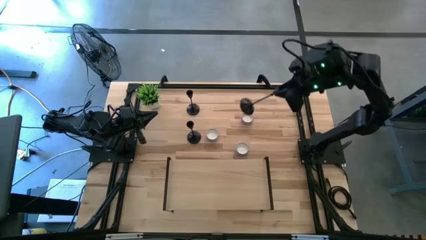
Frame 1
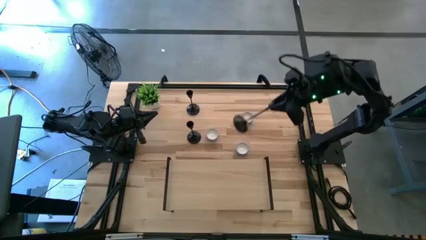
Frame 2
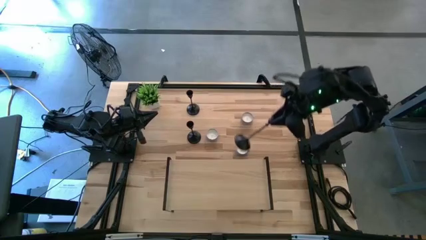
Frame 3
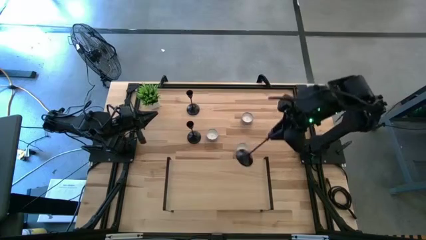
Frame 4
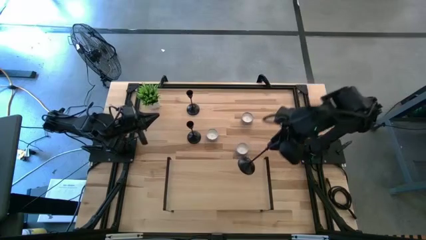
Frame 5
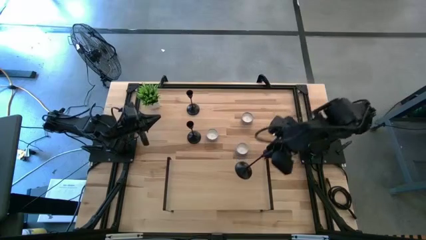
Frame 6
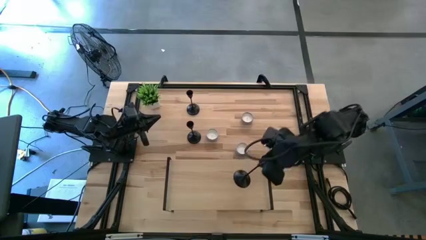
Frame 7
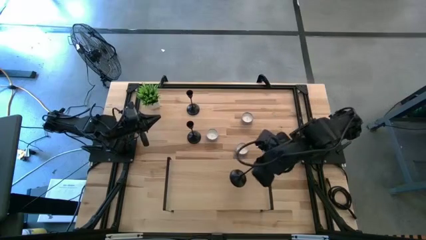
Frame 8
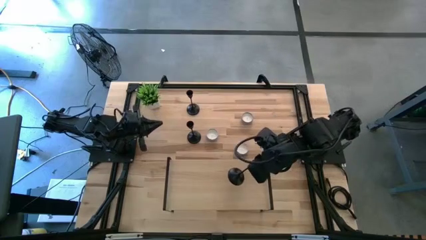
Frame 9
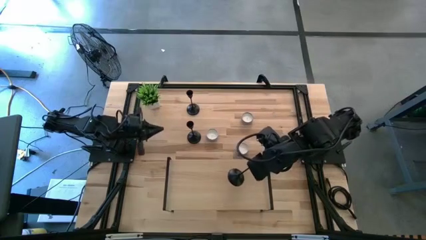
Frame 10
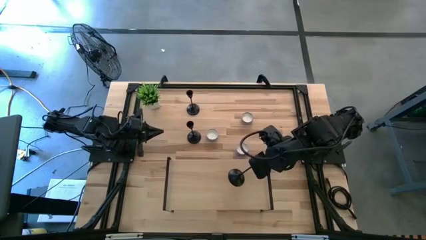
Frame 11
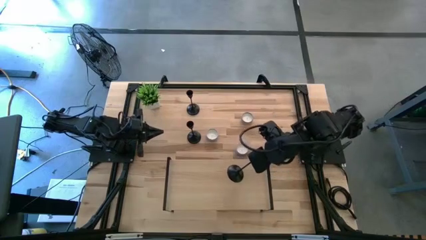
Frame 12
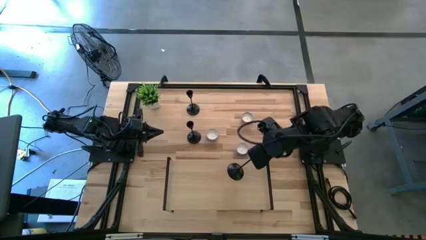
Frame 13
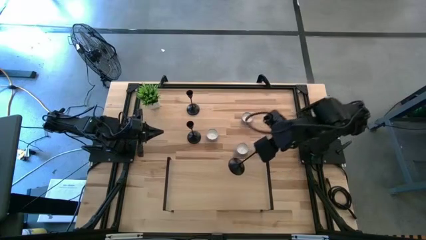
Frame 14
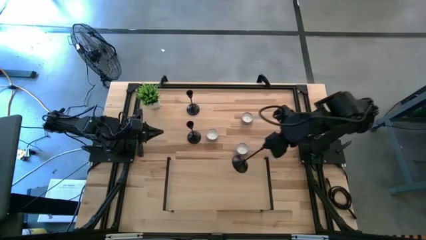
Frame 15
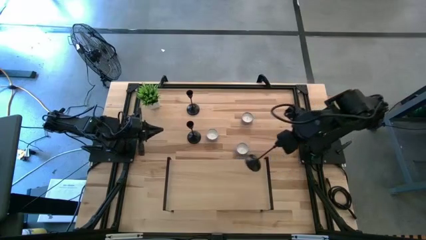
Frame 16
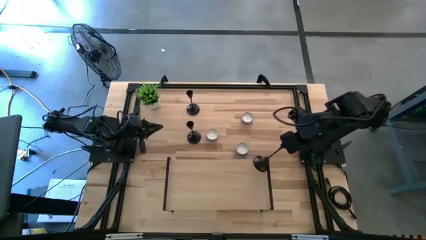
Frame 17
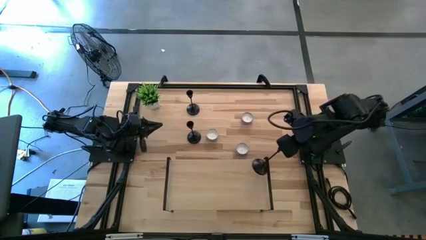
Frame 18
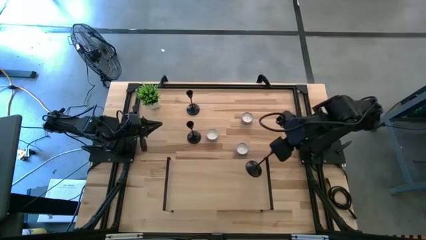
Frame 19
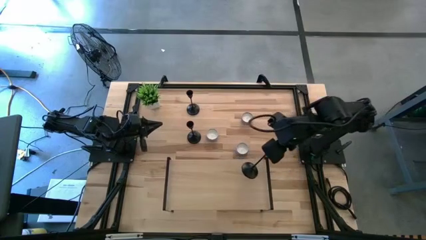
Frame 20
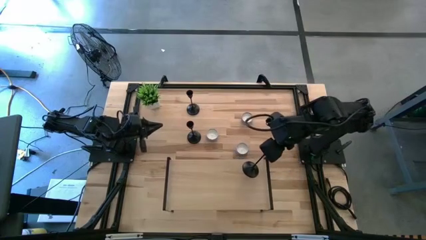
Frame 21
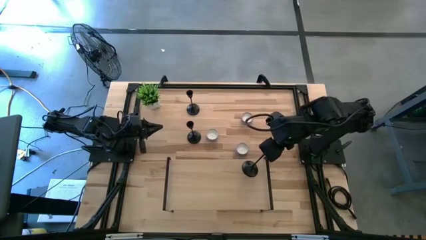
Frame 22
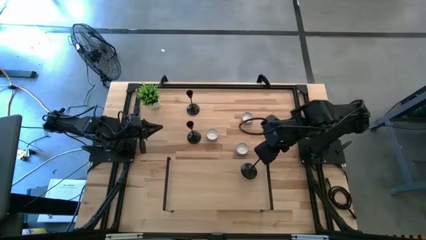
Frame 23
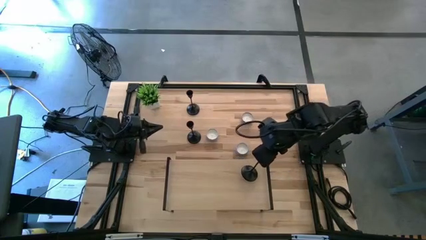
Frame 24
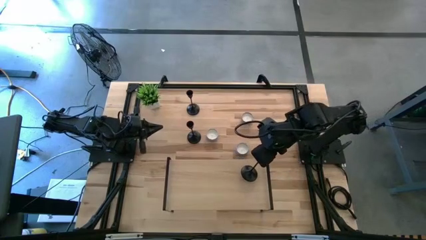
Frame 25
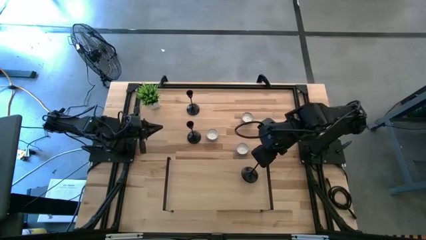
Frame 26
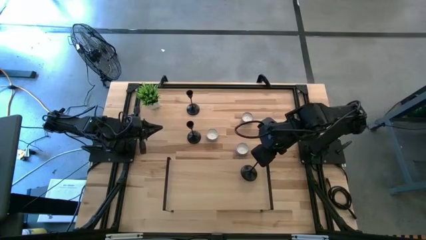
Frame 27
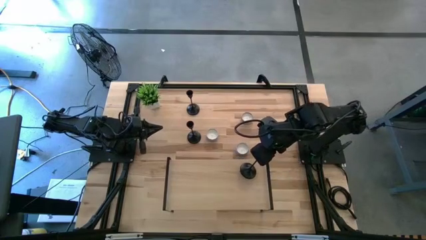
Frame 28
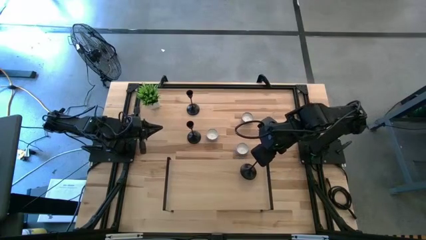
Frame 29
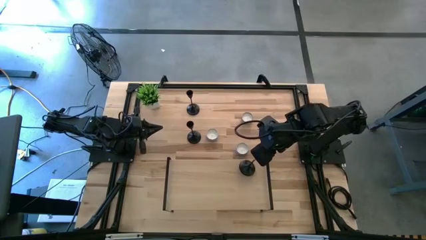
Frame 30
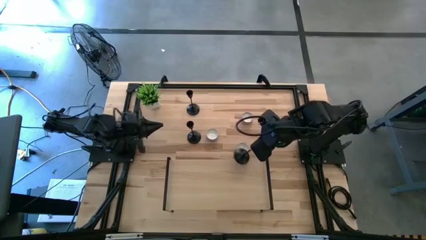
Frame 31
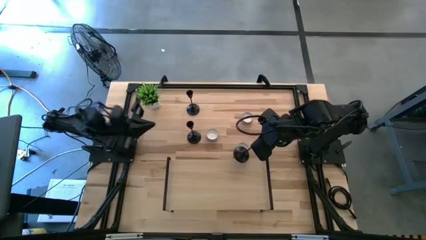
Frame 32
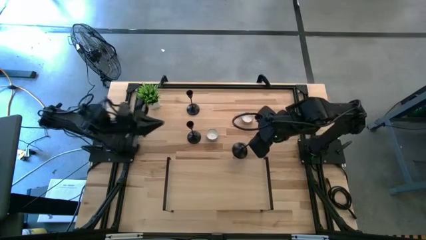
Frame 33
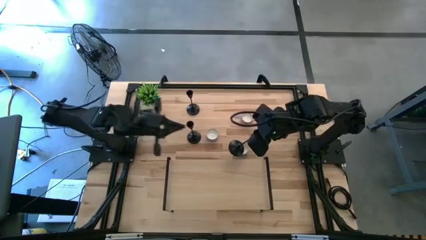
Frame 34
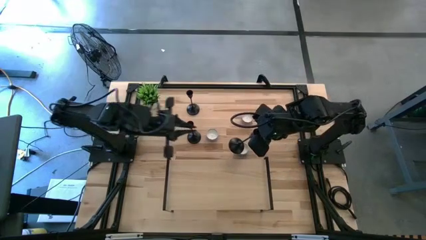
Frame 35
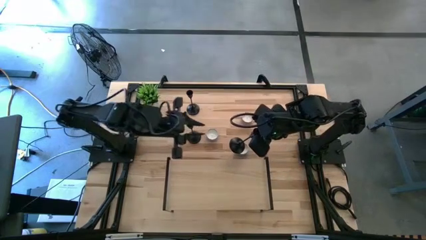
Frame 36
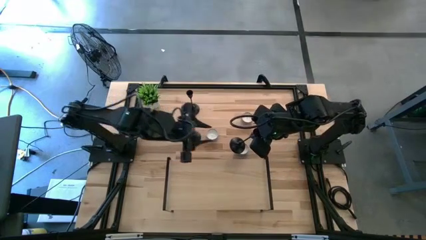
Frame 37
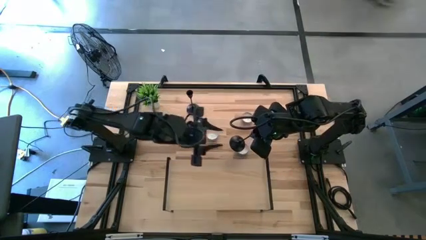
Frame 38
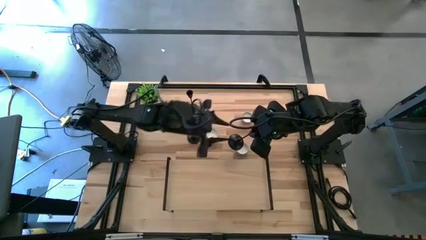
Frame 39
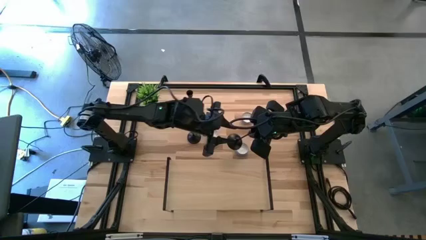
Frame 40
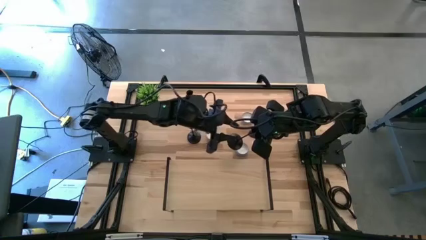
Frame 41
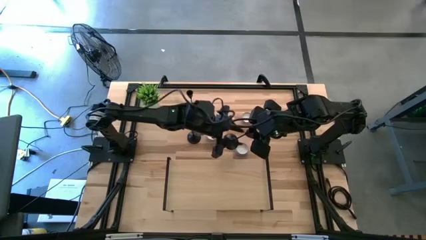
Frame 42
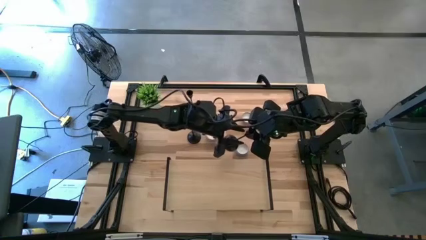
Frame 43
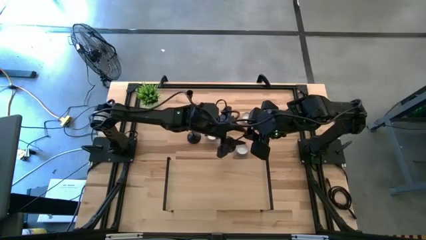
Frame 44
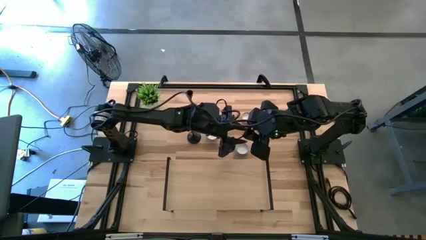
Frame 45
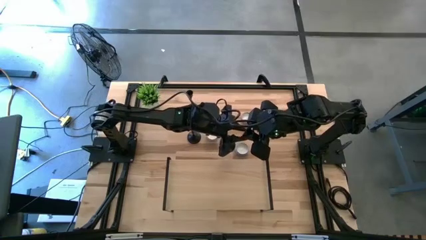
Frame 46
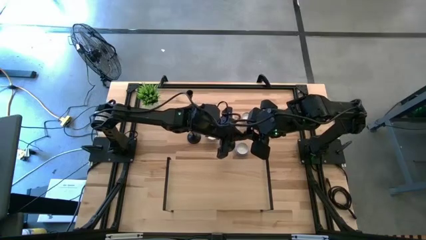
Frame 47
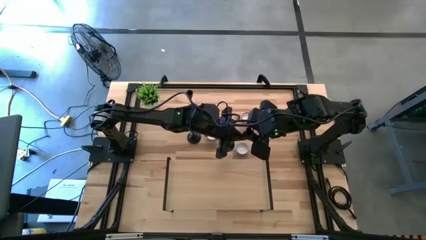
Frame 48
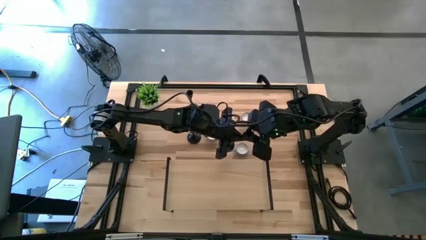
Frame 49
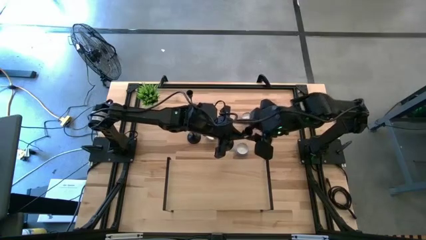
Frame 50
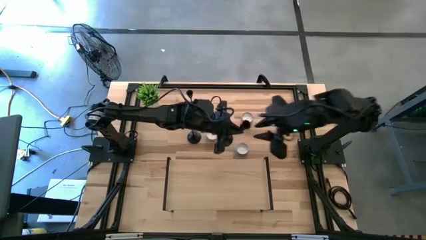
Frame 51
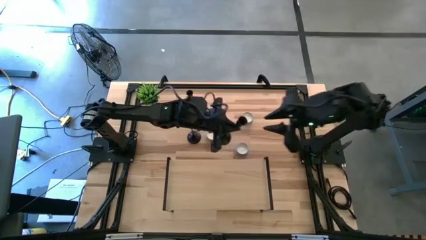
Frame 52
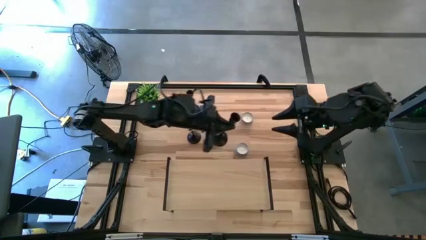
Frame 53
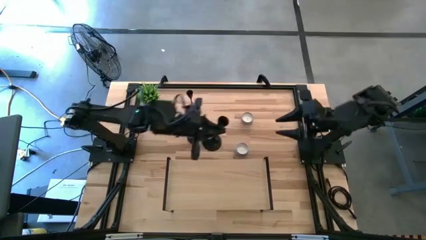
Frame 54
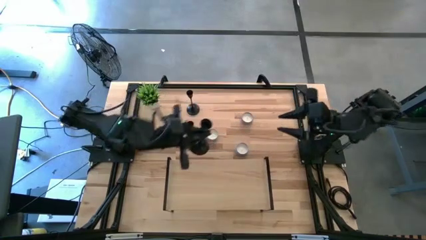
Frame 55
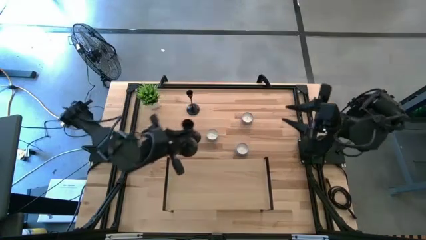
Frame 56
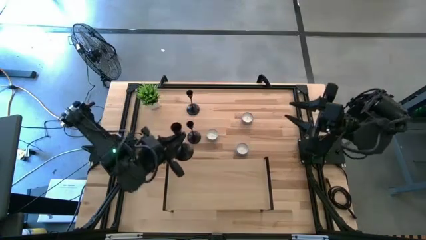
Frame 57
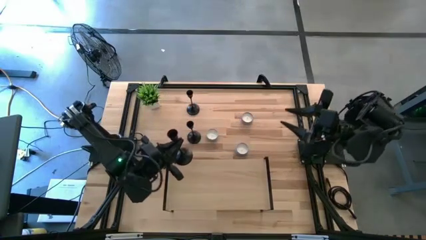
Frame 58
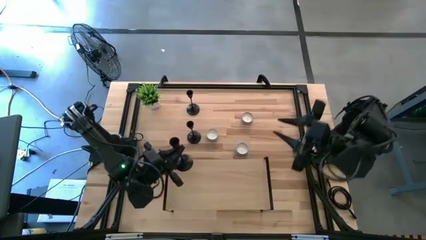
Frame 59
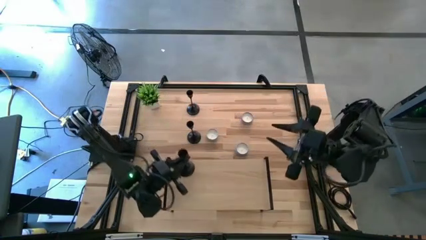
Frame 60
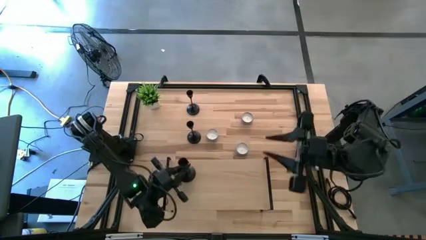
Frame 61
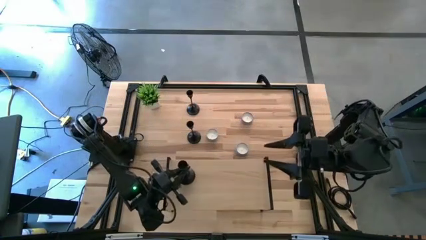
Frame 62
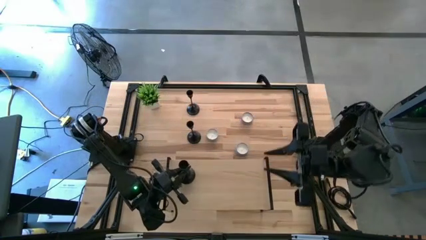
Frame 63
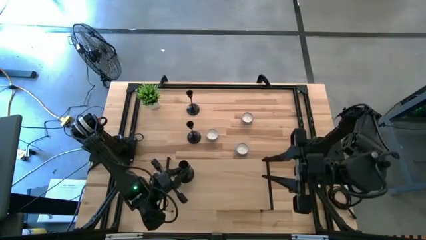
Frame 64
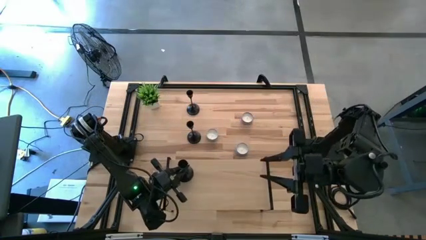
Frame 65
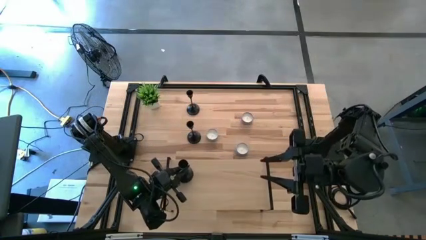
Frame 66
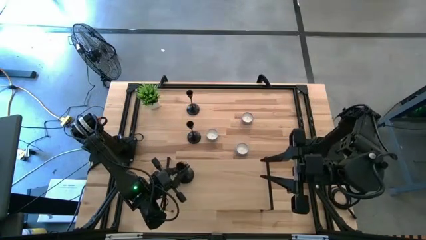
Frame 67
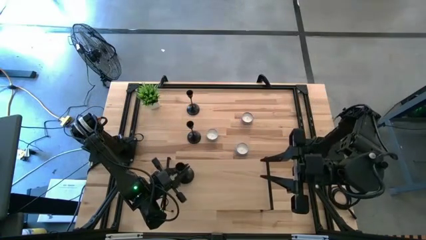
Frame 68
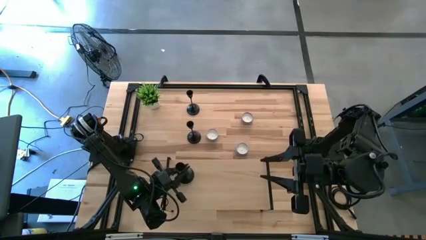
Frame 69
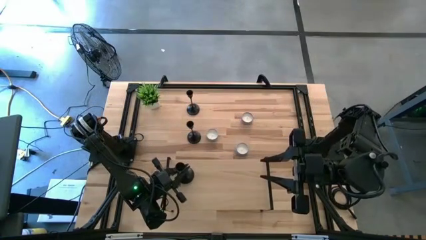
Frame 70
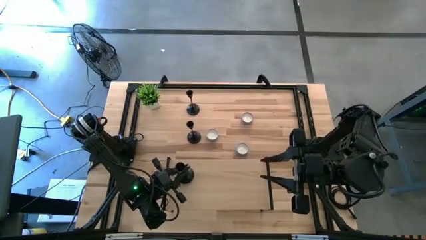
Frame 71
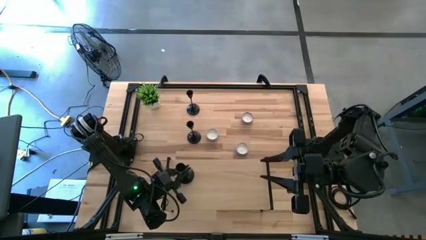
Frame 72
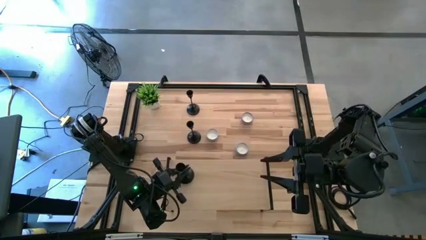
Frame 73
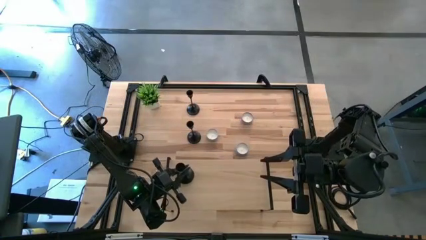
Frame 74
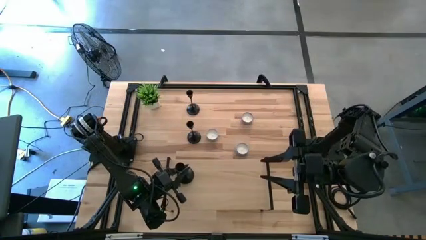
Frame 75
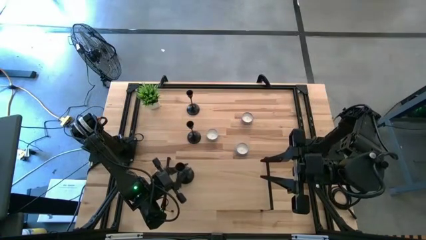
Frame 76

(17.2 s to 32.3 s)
Task: Pick & Place candle stick holders
Put the top right black candle holder on the shelf
